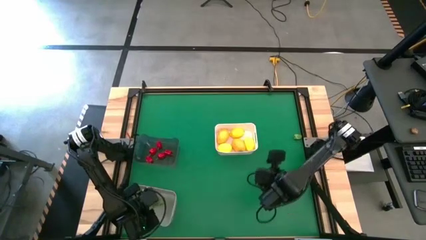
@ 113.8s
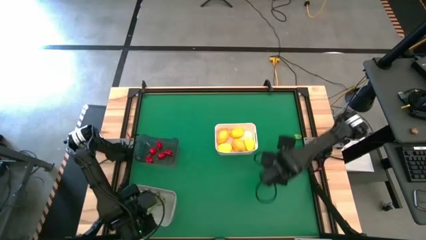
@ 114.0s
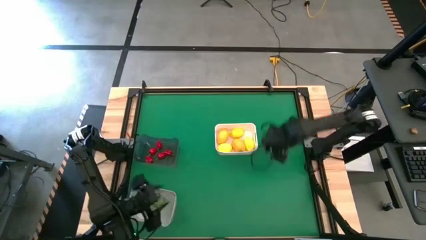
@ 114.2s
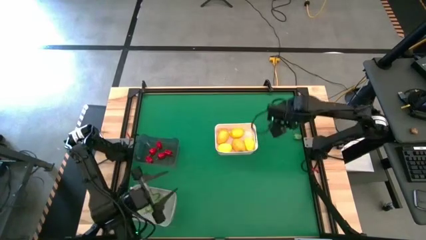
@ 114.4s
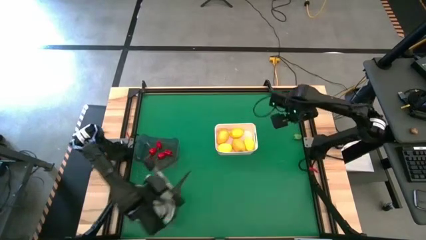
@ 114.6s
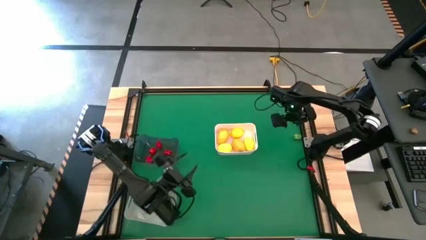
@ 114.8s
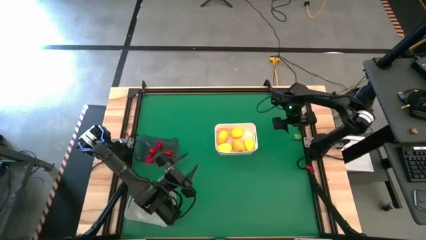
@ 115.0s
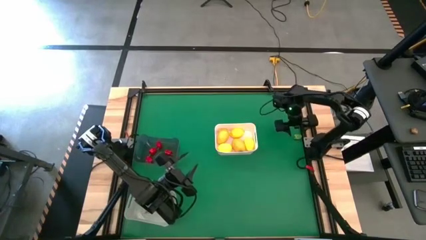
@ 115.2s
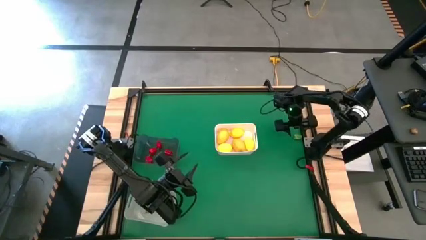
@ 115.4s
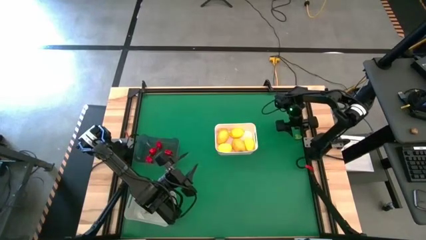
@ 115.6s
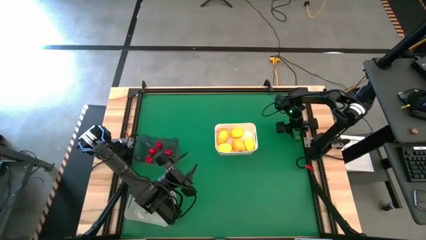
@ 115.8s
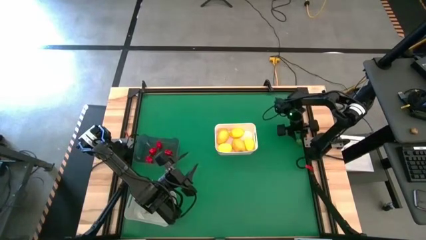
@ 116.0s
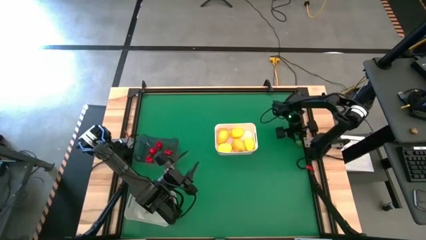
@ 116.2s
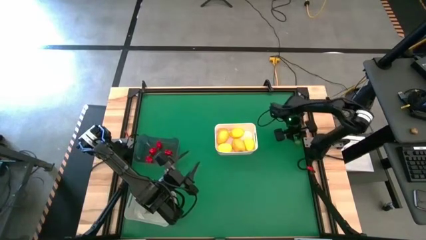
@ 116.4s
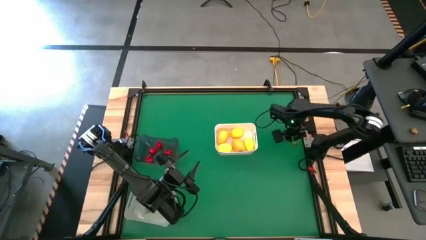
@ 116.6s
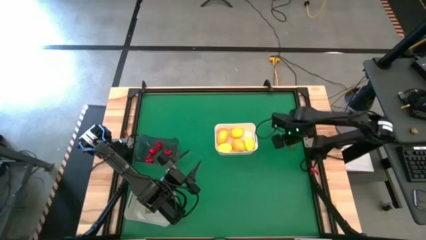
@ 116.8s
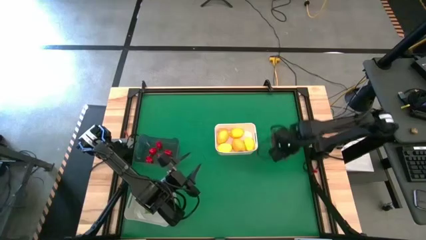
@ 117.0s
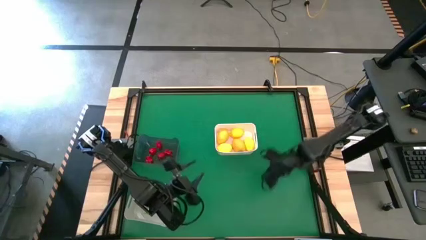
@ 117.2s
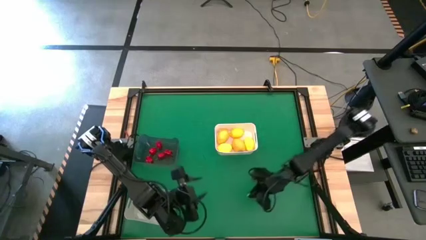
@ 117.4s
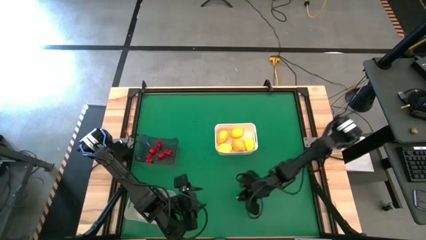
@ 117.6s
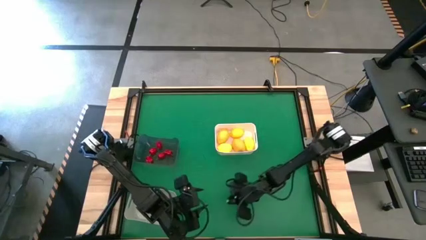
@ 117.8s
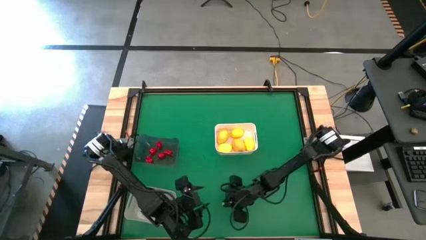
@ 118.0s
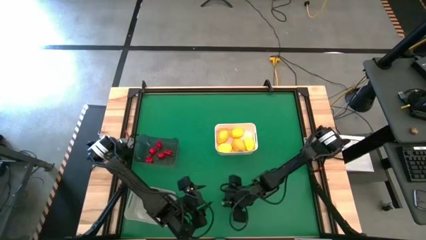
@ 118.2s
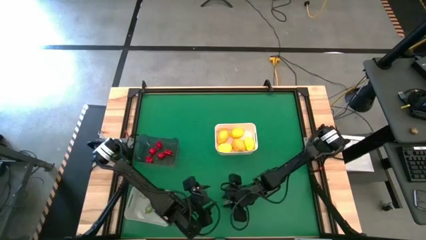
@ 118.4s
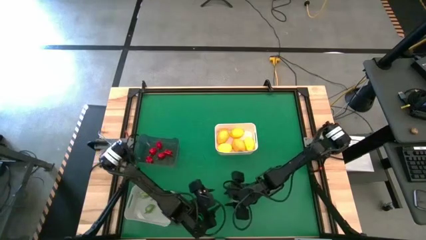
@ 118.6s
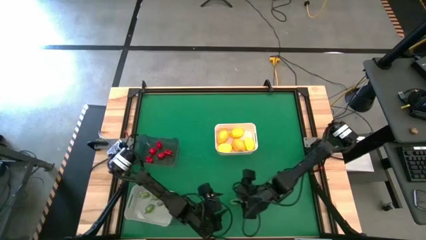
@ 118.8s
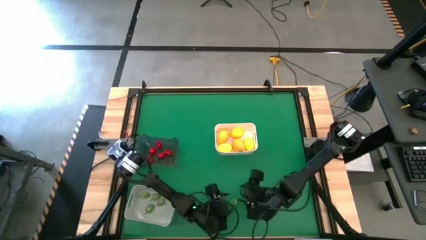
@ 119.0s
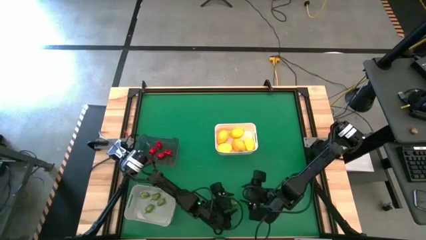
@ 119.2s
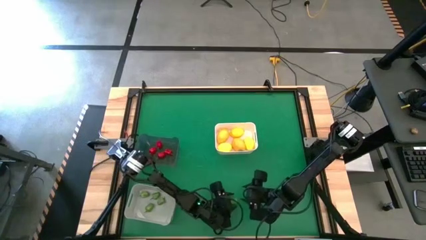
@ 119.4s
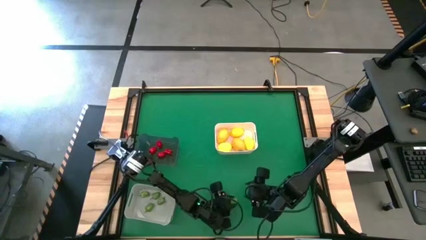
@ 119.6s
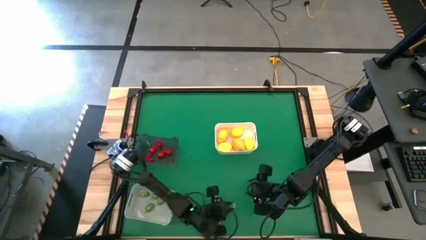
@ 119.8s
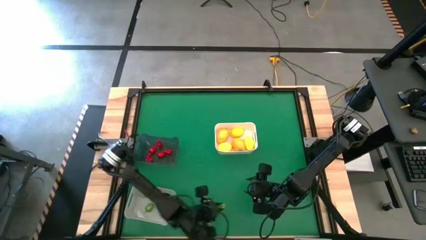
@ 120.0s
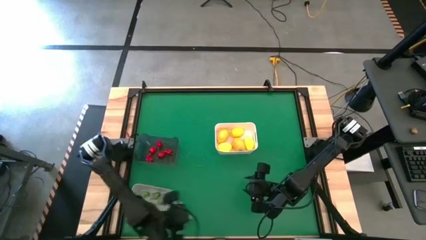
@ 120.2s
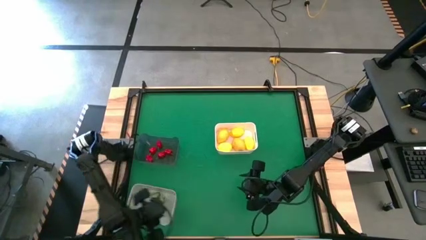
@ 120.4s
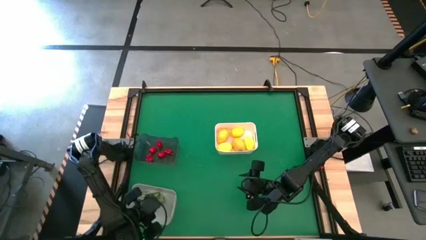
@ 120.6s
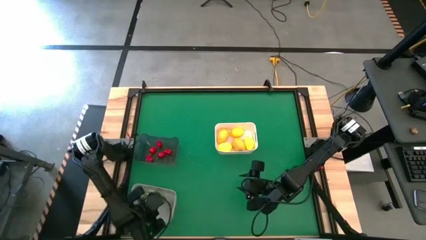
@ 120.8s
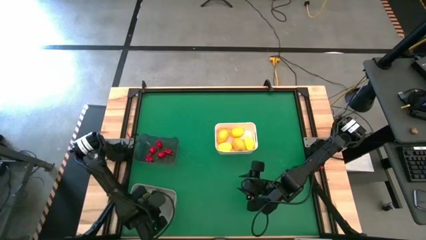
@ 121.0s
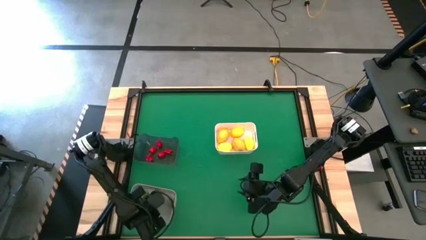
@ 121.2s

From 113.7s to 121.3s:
Task: Sort produce into baskets
Put the green chili pepper into the gray bin

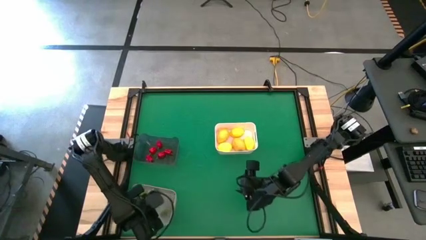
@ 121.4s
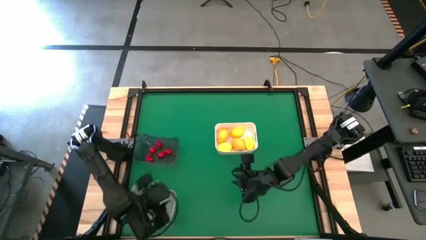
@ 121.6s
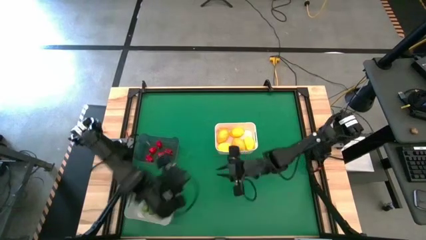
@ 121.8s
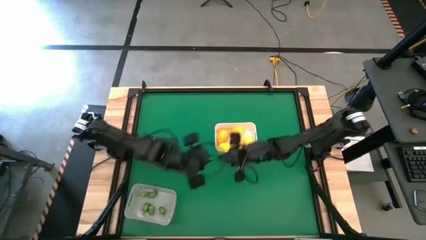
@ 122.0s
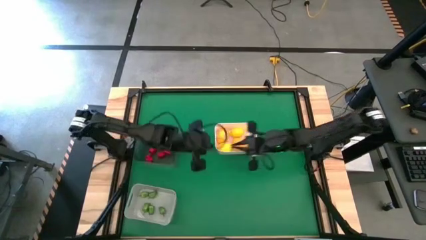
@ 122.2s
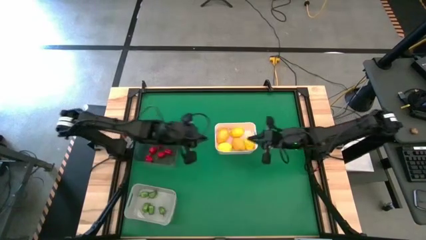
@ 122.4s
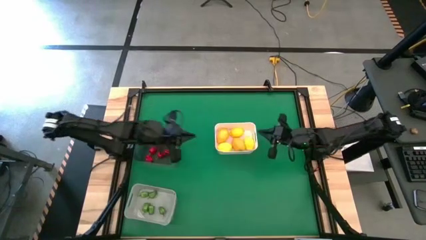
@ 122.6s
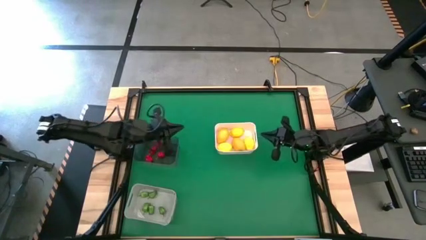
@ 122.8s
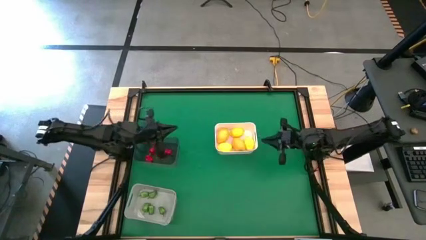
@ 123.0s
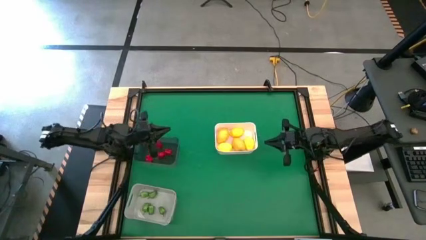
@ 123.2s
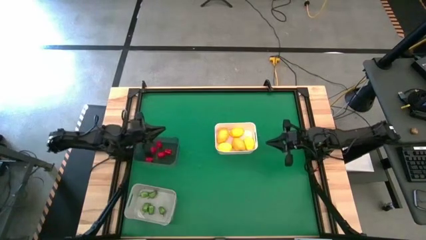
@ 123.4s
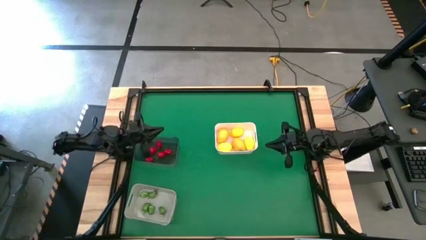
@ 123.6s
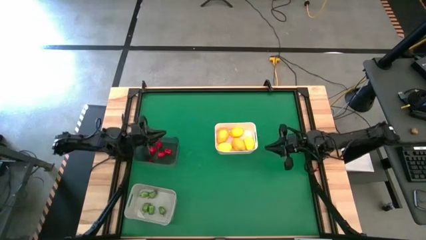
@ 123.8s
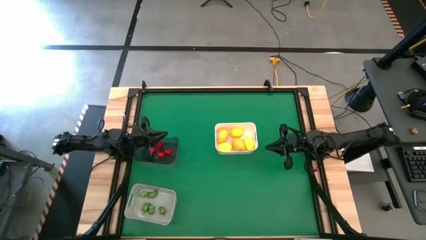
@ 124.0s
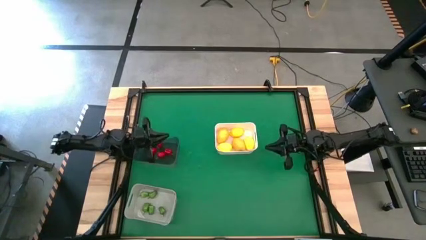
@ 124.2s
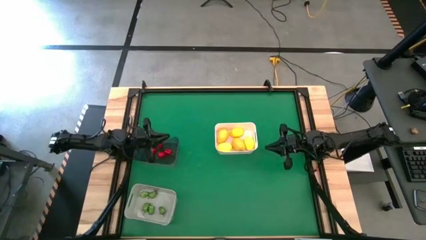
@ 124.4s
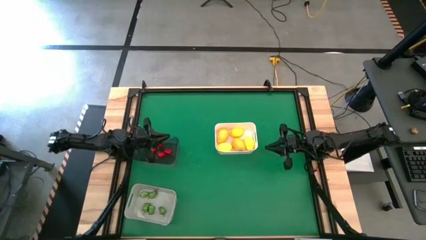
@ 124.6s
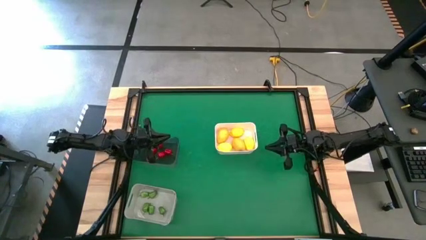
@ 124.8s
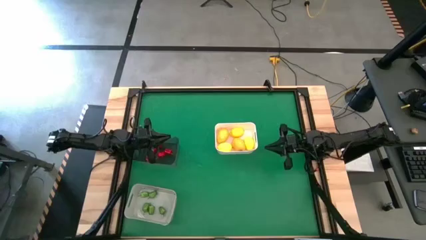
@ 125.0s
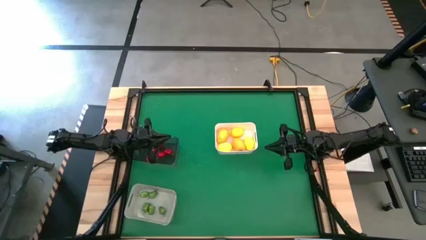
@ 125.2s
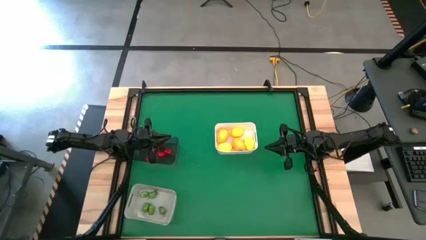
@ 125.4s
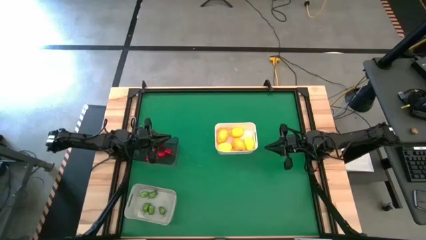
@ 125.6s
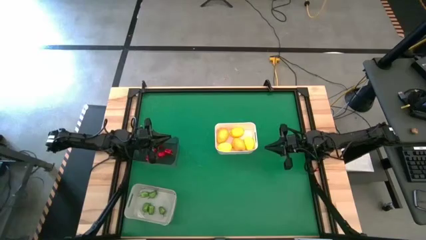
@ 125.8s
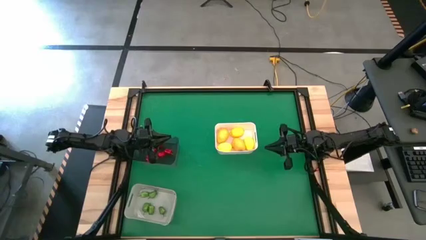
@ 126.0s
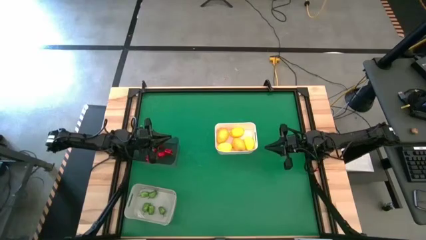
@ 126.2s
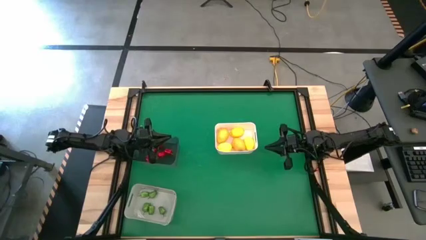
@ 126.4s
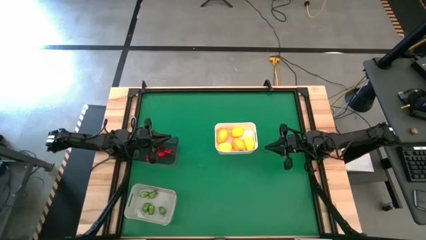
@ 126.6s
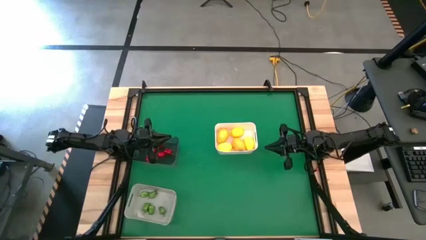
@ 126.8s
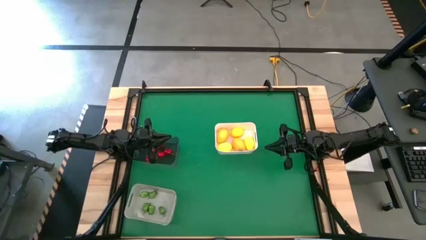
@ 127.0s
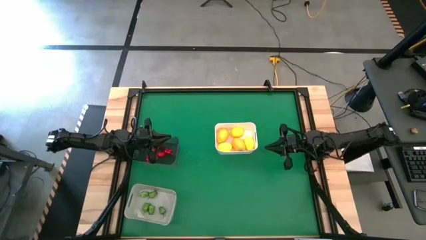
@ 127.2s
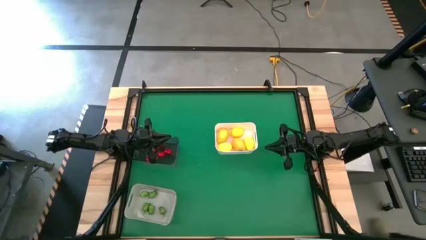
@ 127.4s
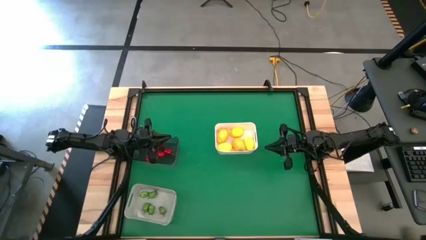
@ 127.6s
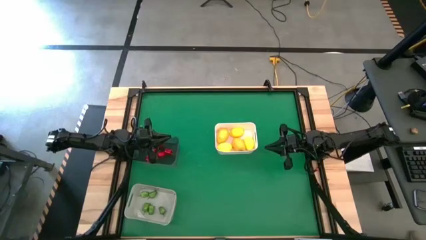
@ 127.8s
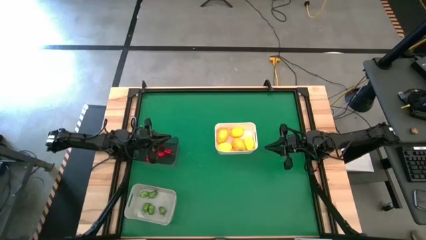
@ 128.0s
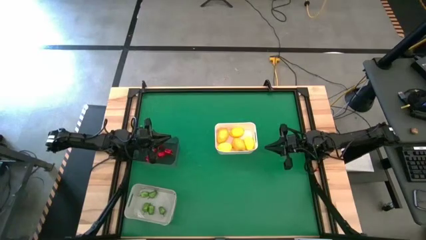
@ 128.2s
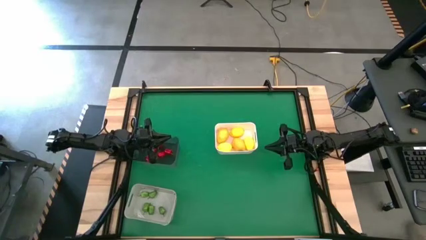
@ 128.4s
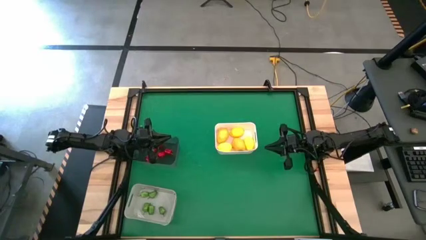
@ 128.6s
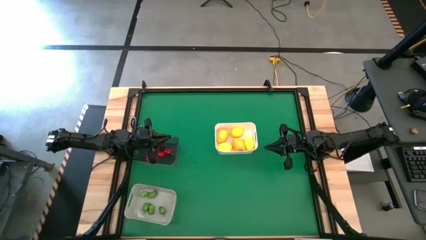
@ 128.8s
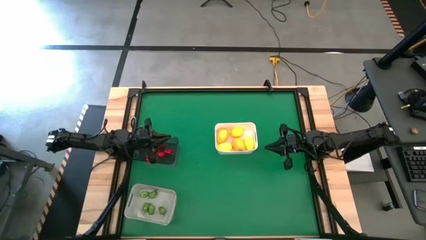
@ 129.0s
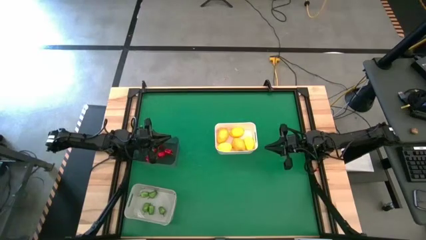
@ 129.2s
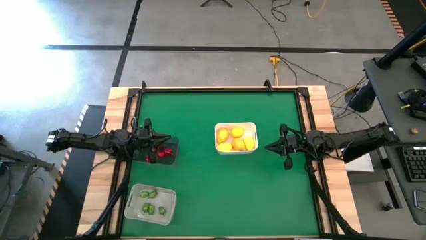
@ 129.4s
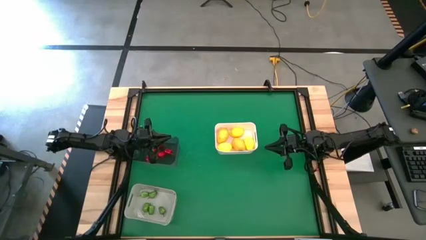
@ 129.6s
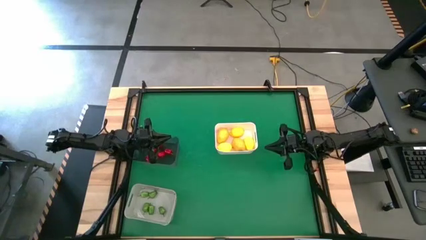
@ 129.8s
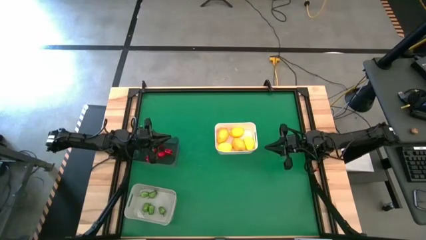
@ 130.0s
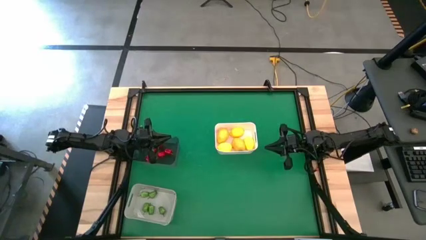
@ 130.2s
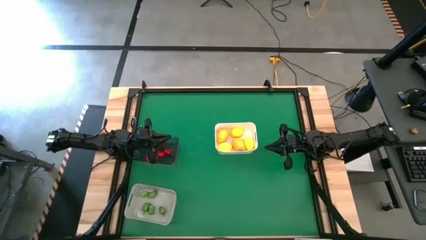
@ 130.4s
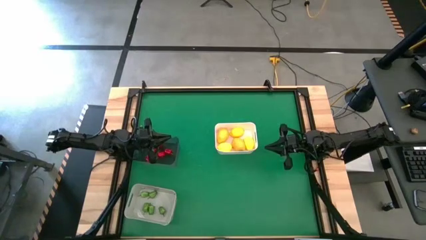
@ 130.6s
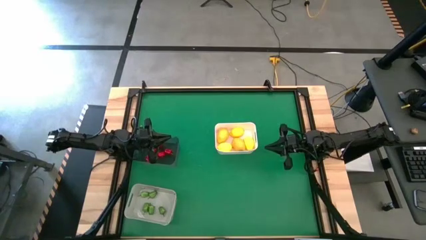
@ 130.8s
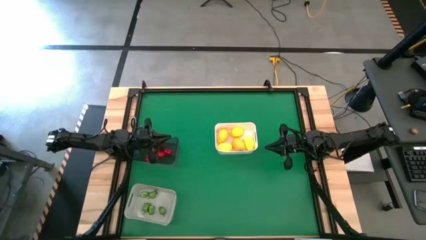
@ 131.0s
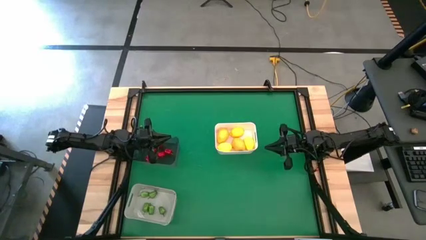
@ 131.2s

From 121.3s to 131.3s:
Return to Home Position
